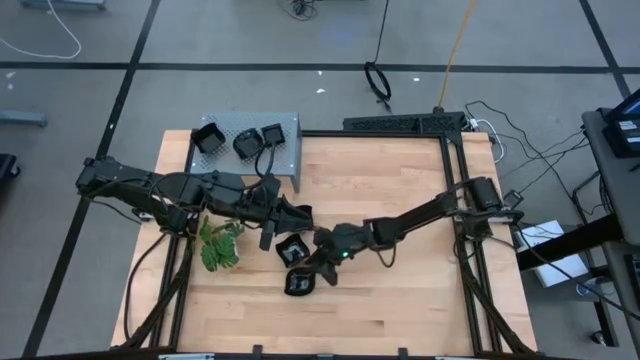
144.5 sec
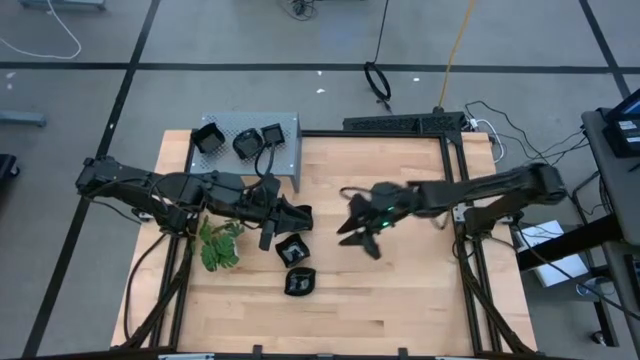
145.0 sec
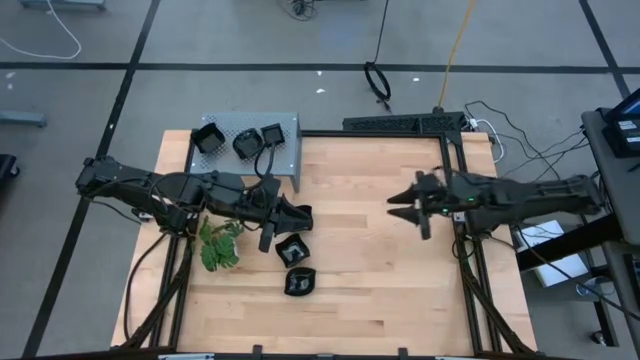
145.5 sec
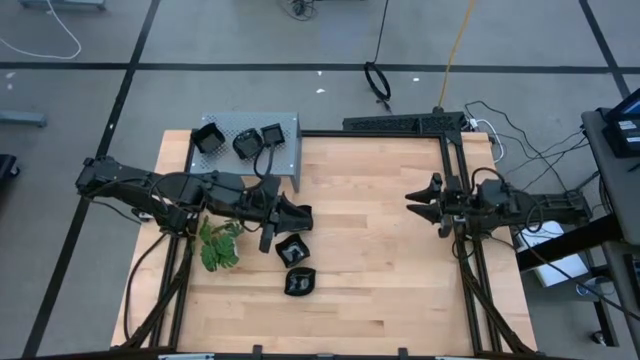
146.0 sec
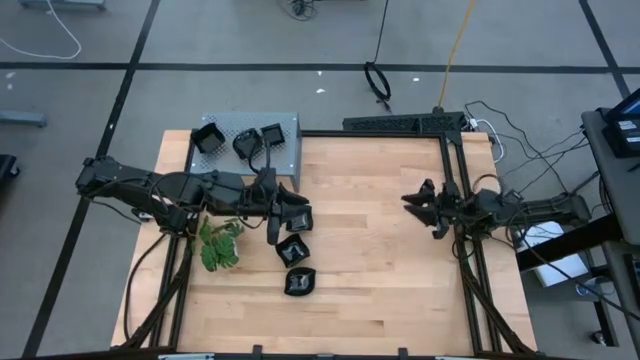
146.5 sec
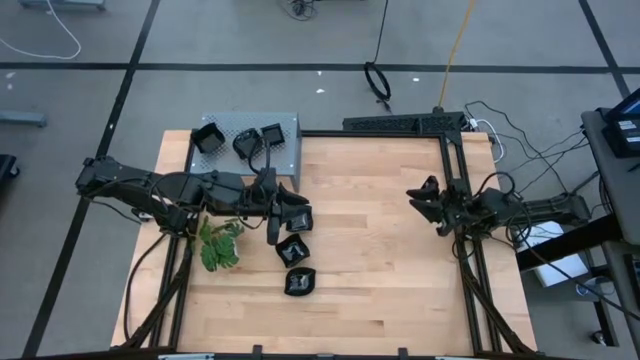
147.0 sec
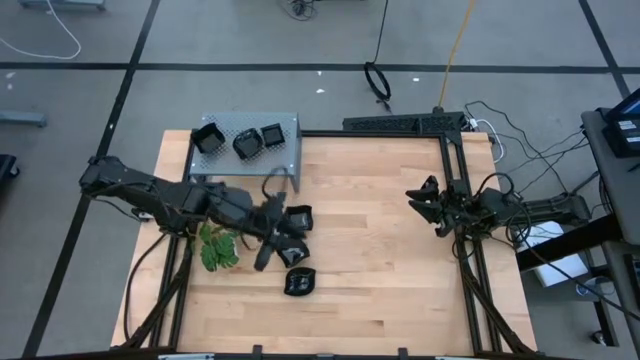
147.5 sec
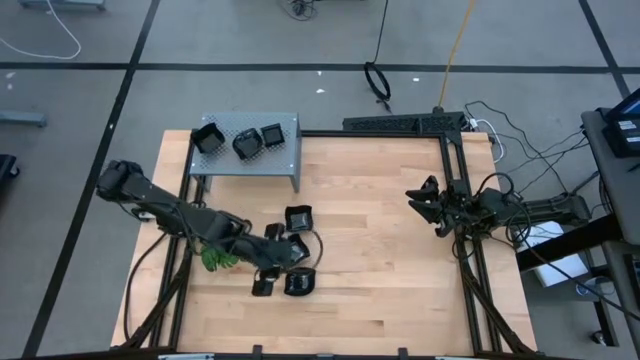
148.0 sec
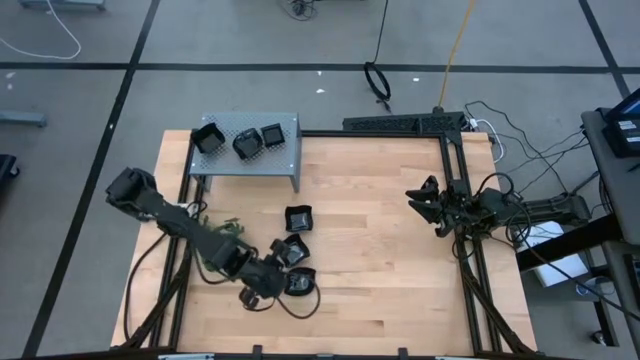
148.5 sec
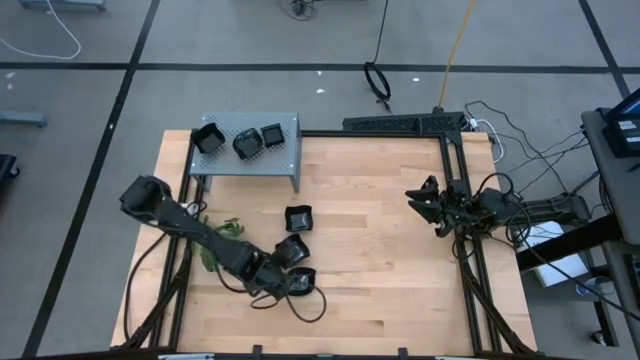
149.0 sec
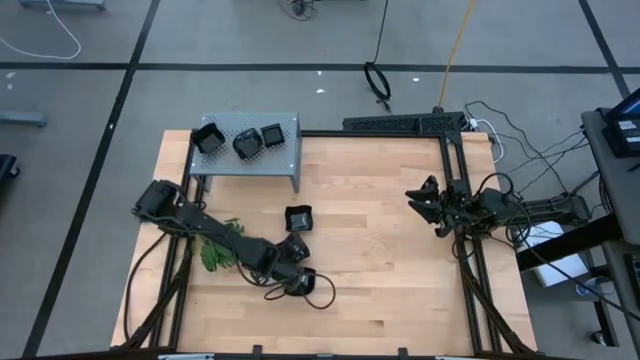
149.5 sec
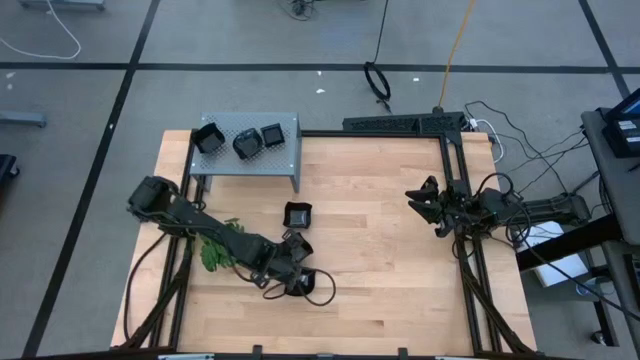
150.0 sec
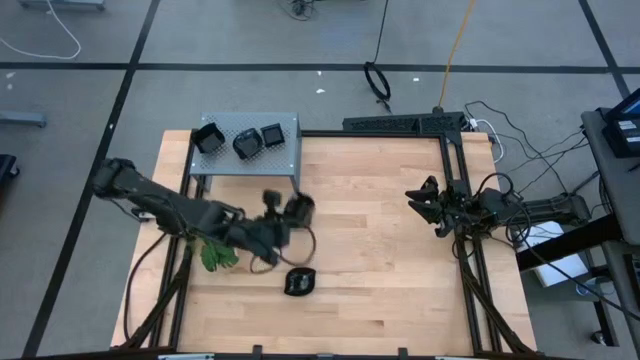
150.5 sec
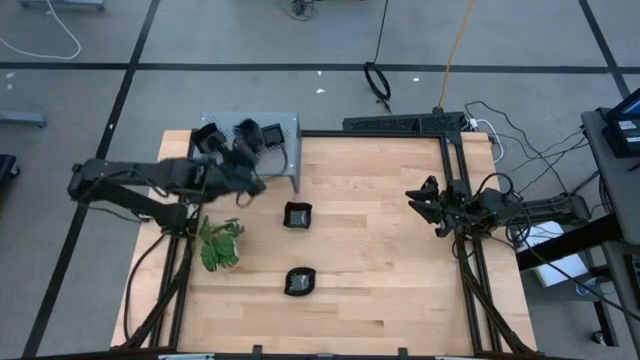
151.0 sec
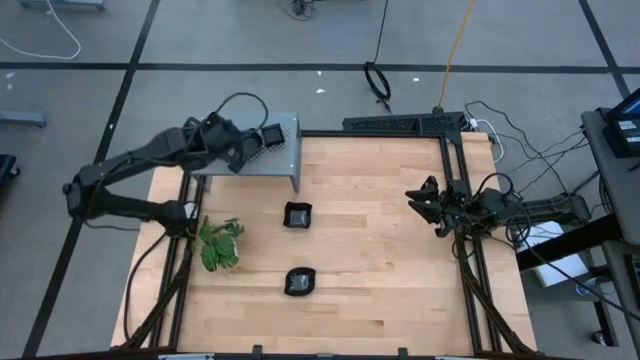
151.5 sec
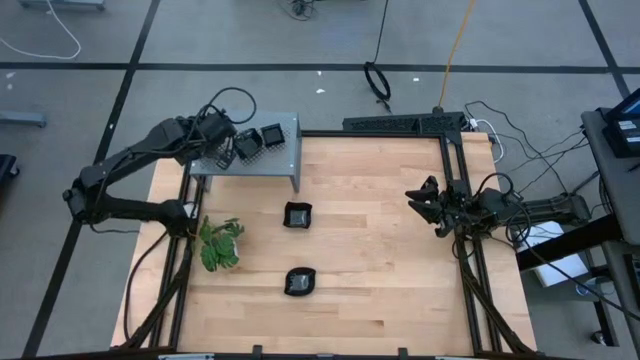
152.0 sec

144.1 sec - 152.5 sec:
Task: Pick & Place Mini shaped plates
Stack the distorted square plate on top of the distorted plate on the shelf

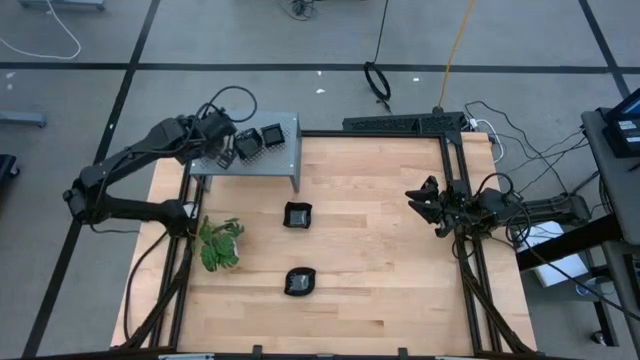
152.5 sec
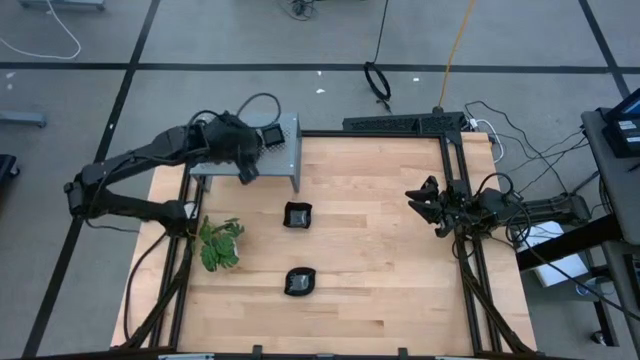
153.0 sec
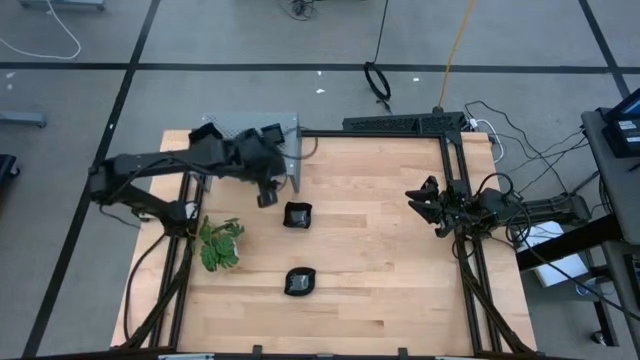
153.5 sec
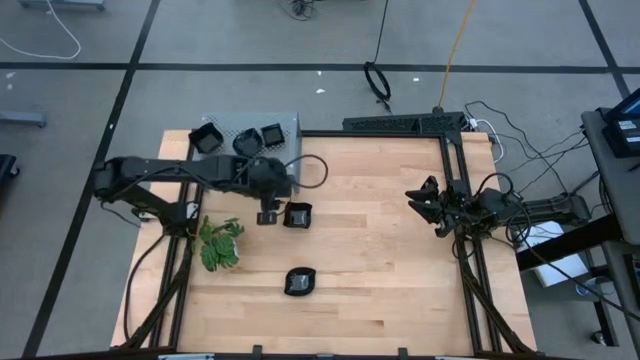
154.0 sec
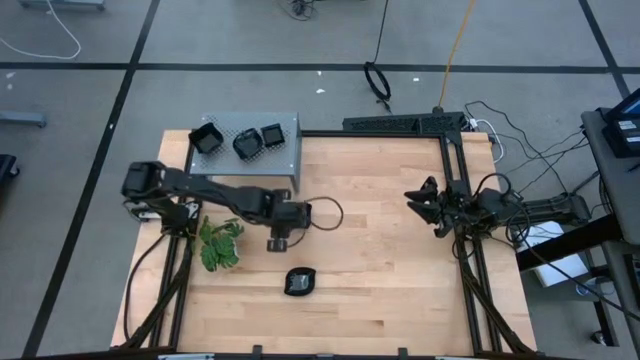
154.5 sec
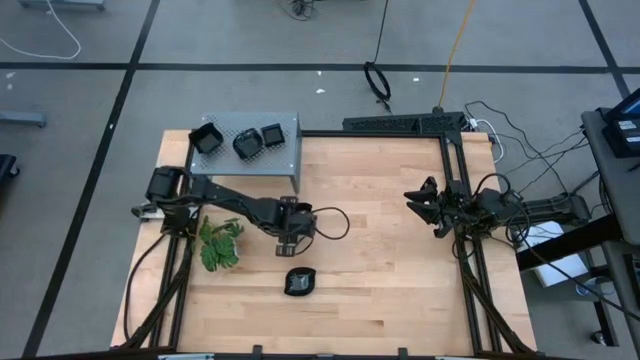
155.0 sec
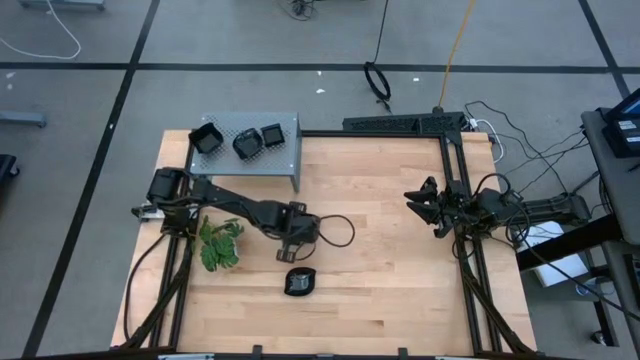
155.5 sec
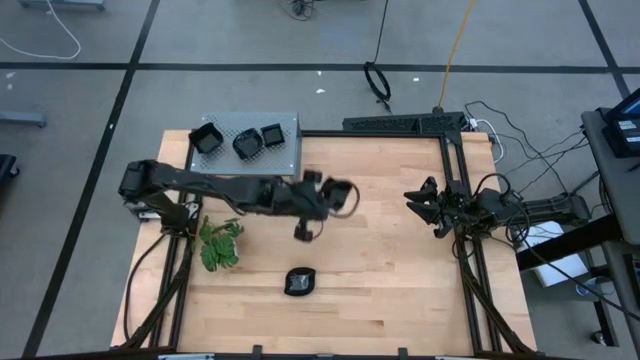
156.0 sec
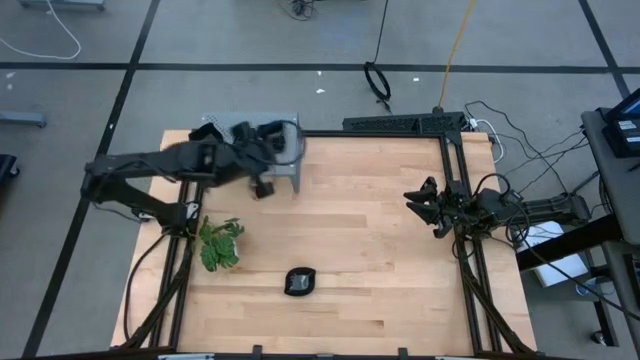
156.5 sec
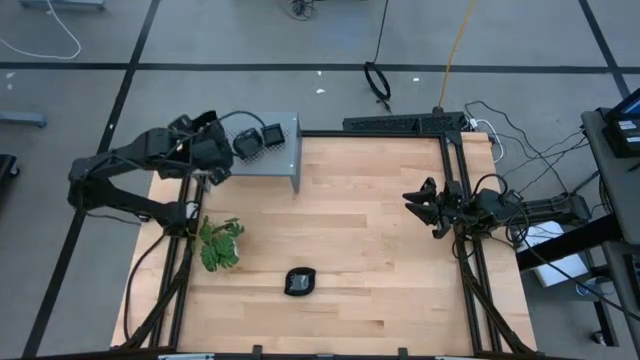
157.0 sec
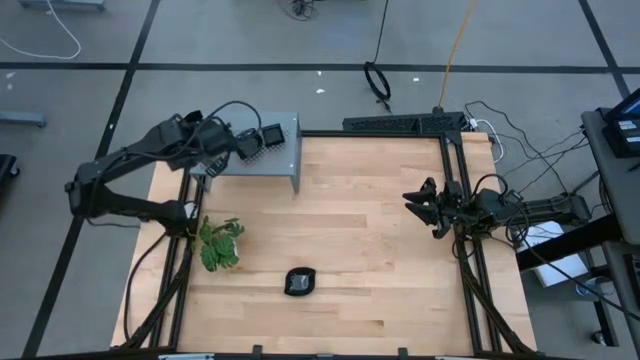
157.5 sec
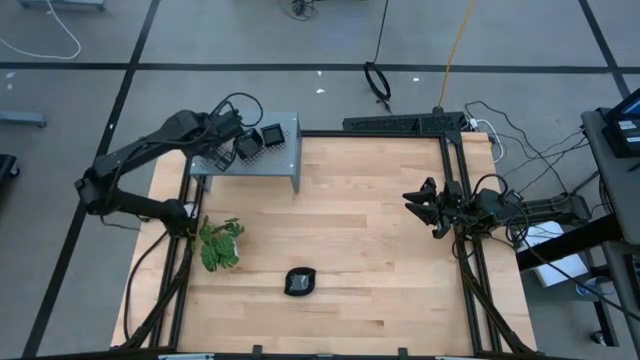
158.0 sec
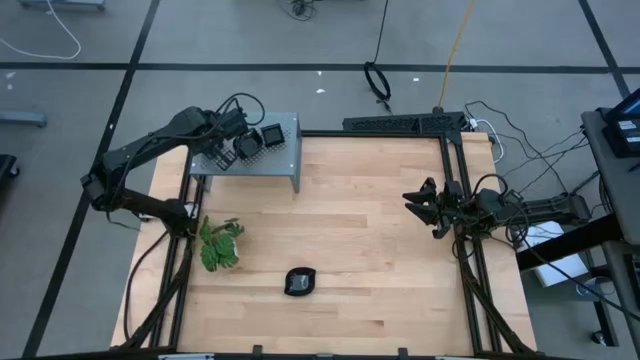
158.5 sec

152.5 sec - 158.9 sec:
Stack the distorted square plate on top of the distorted plate on the shelf

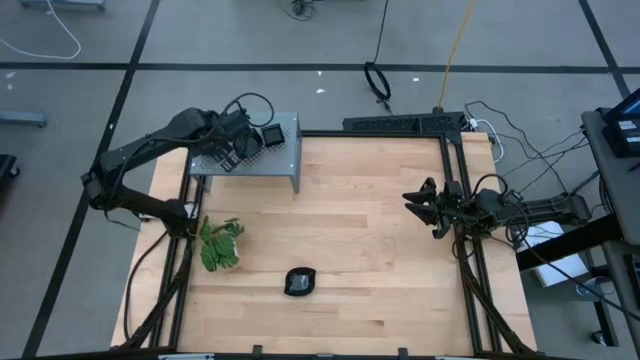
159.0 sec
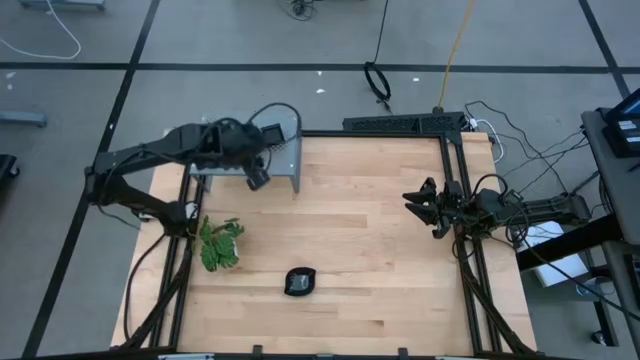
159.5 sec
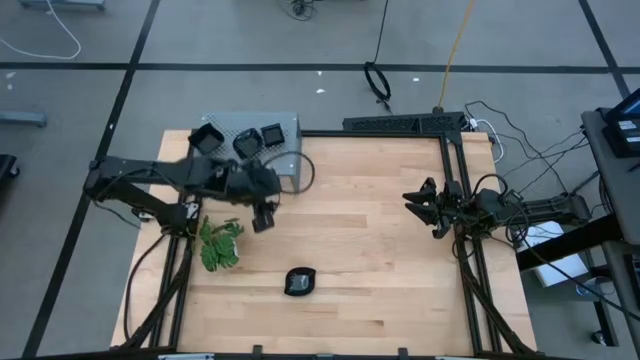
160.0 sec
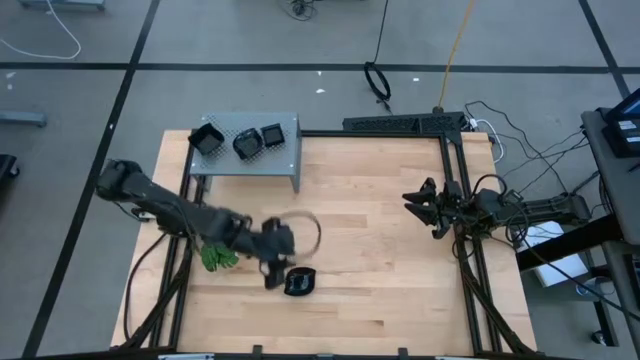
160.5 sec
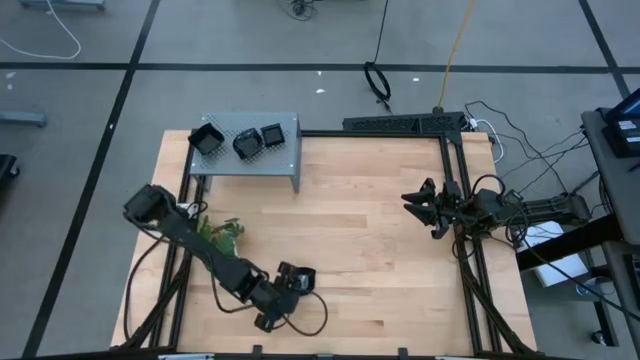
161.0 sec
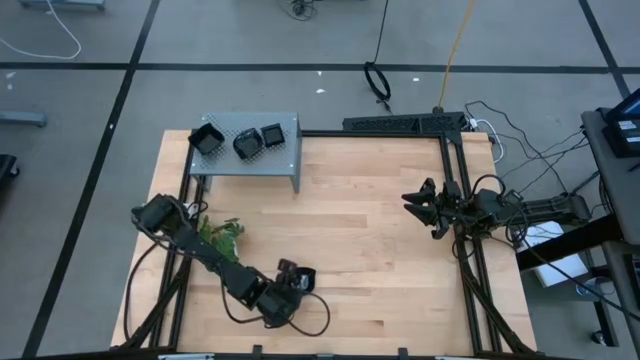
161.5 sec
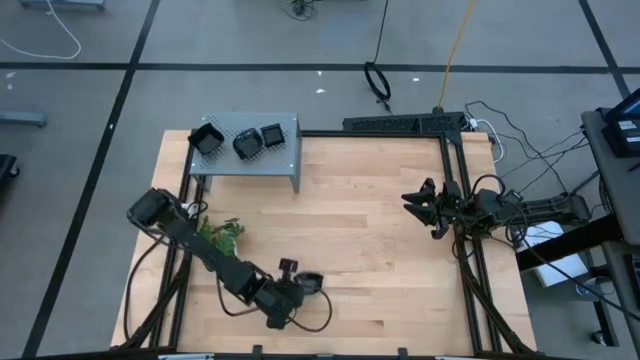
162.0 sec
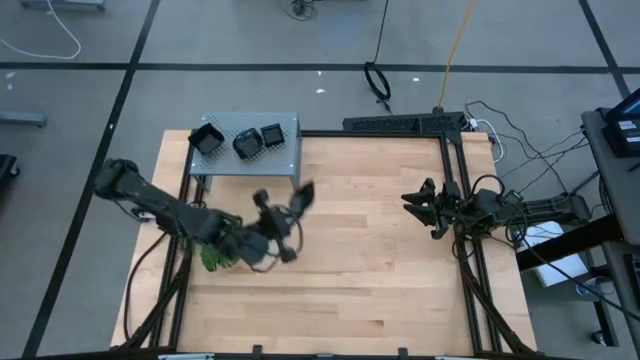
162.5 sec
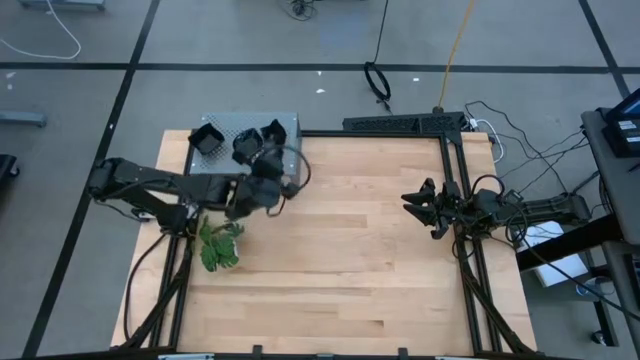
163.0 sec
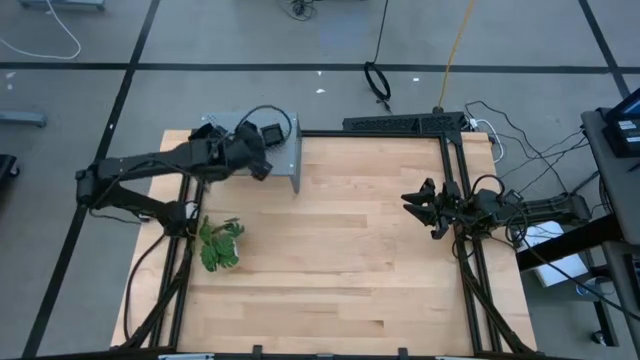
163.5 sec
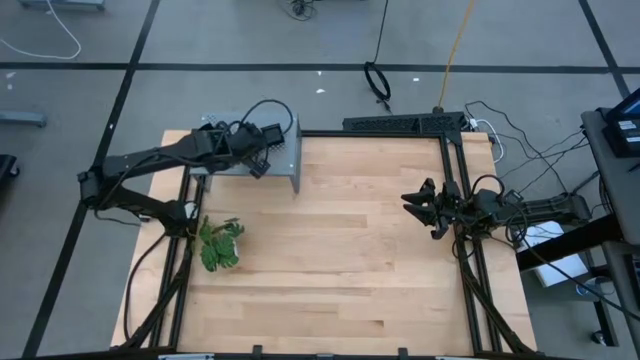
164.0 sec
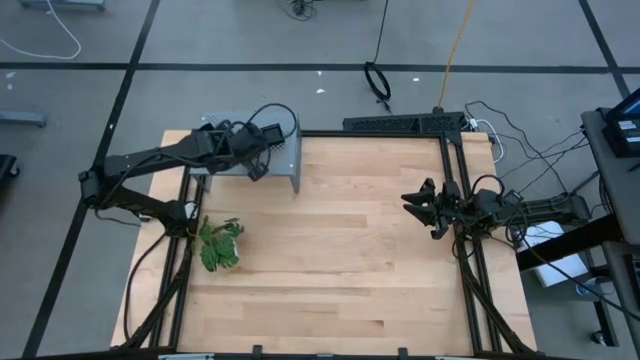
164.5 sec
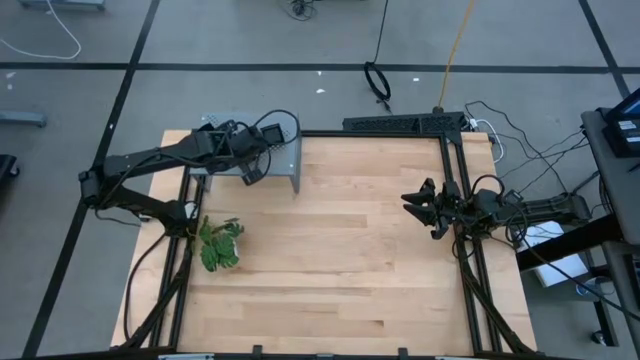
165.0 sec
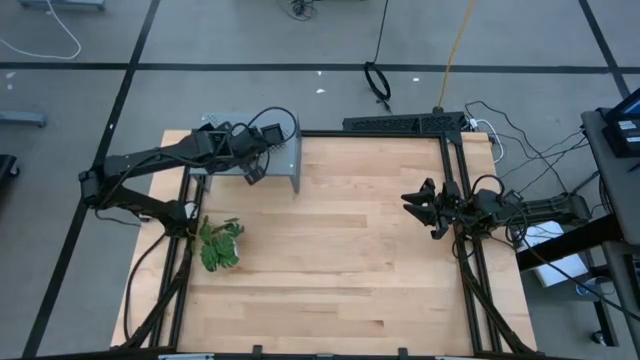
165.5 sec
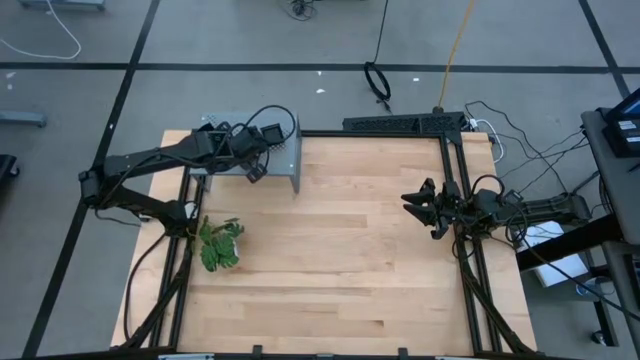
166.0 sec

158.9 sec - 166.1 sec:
Stack the leaf shaped plate on top of the leaf shaped plate on the shelf
